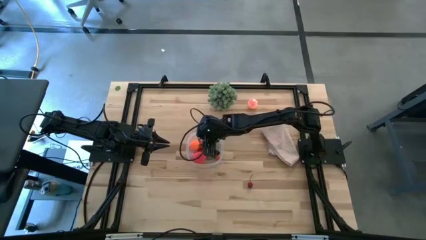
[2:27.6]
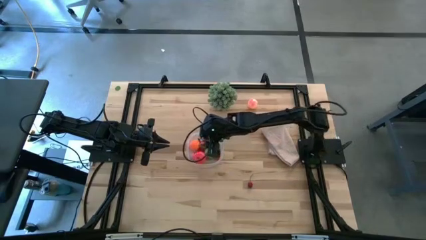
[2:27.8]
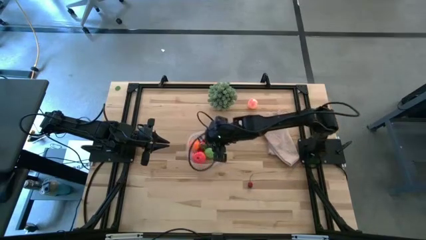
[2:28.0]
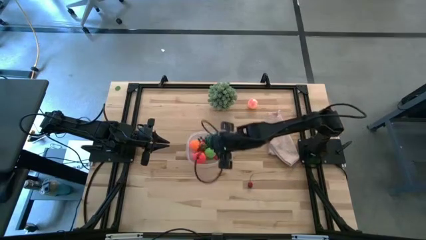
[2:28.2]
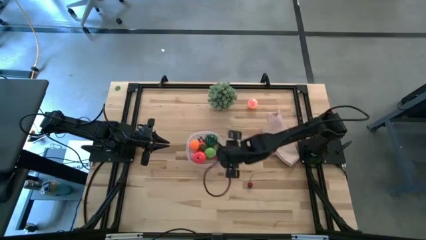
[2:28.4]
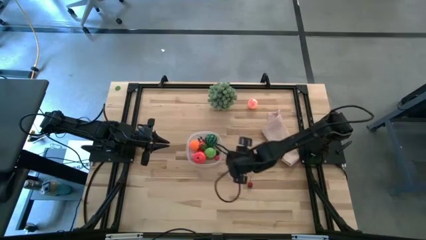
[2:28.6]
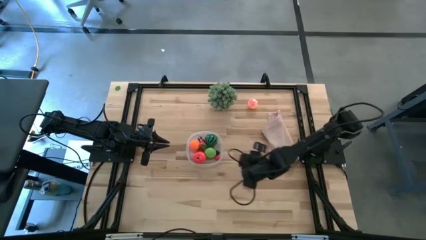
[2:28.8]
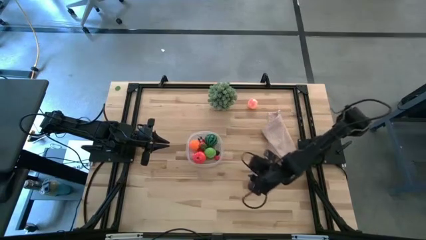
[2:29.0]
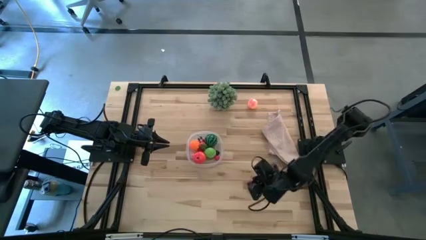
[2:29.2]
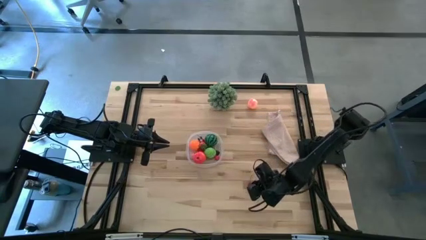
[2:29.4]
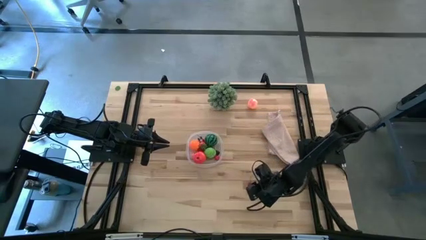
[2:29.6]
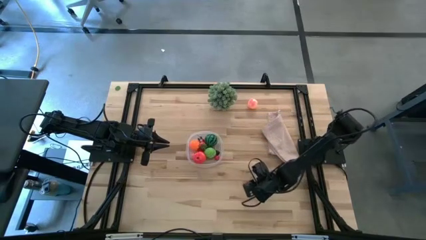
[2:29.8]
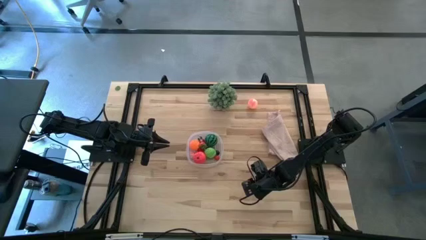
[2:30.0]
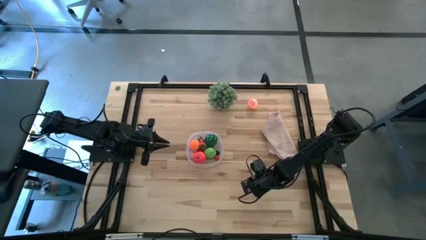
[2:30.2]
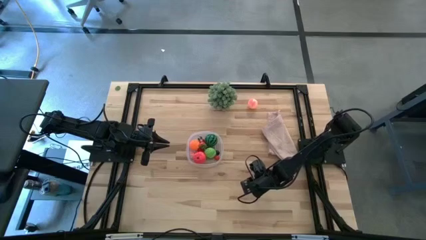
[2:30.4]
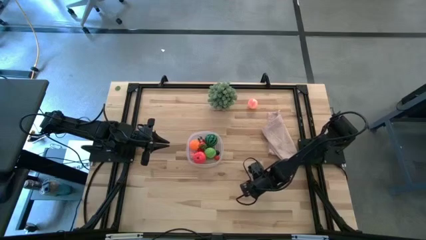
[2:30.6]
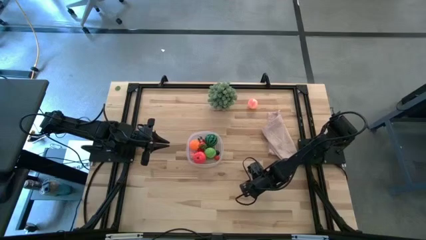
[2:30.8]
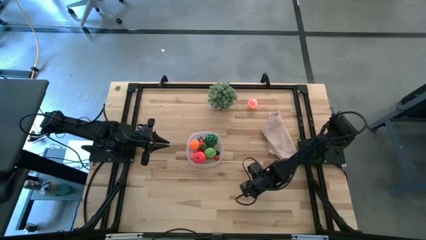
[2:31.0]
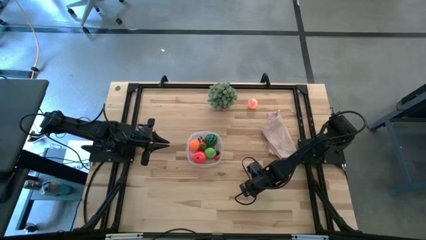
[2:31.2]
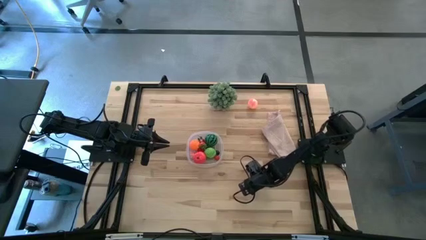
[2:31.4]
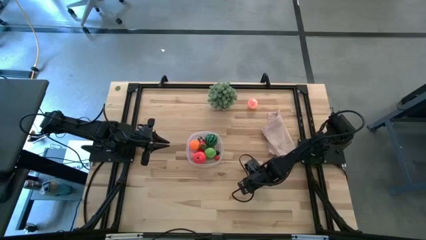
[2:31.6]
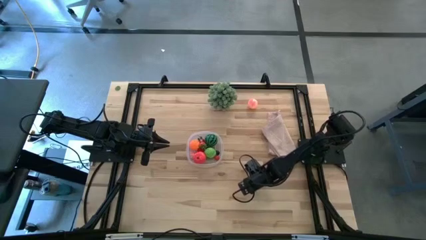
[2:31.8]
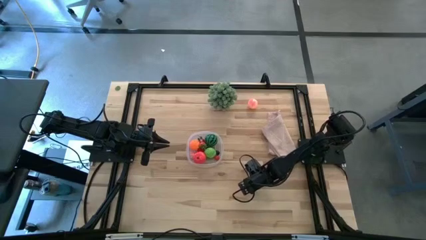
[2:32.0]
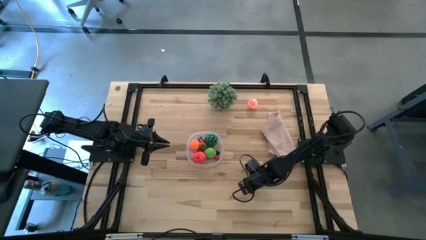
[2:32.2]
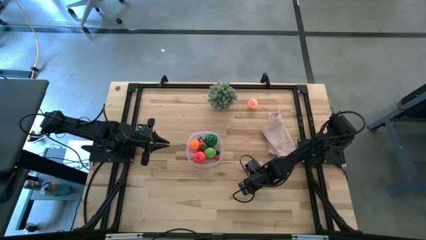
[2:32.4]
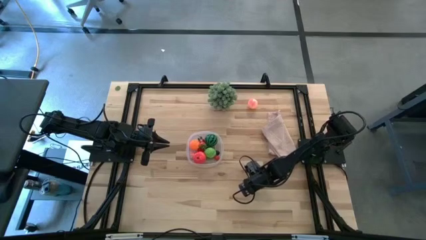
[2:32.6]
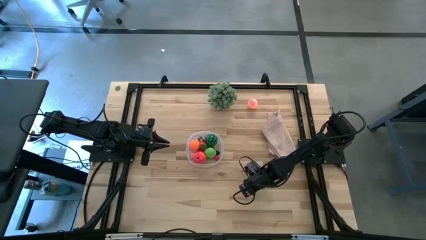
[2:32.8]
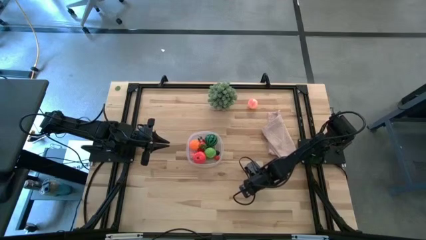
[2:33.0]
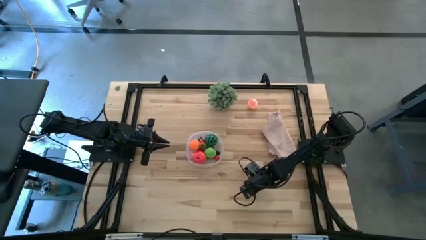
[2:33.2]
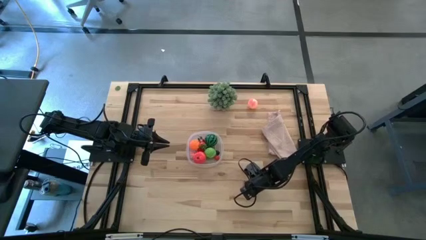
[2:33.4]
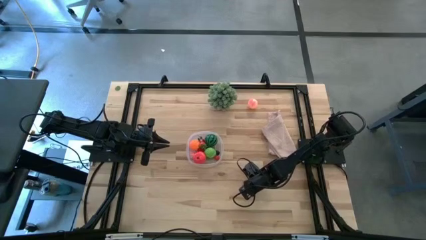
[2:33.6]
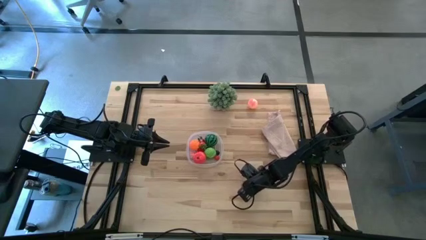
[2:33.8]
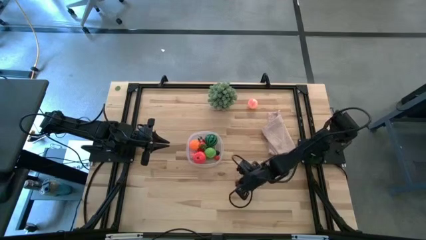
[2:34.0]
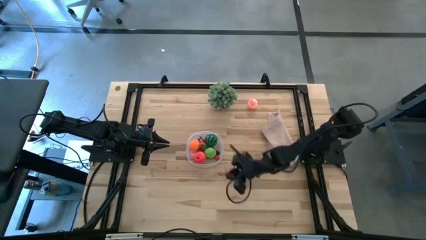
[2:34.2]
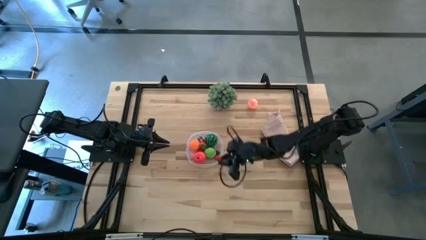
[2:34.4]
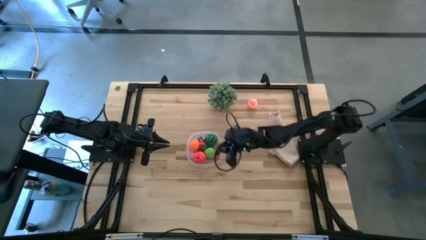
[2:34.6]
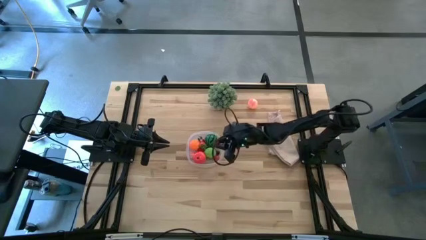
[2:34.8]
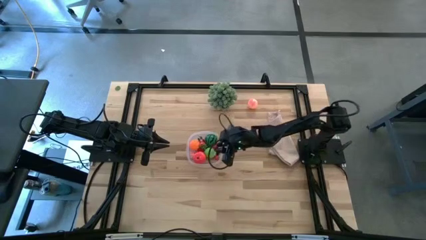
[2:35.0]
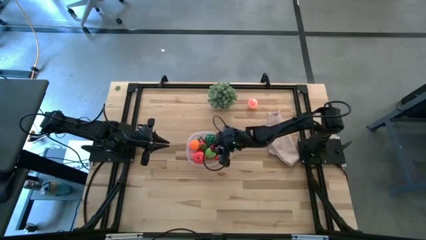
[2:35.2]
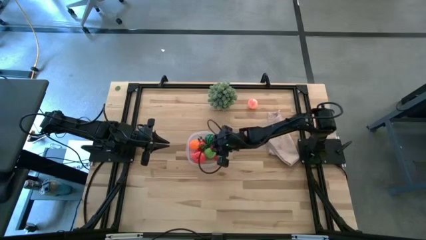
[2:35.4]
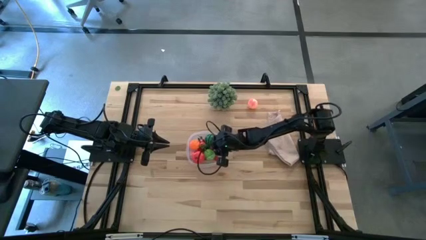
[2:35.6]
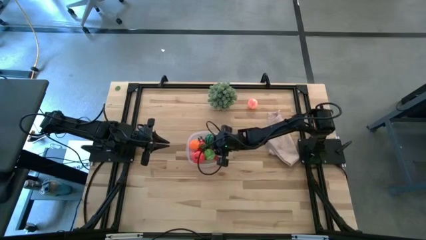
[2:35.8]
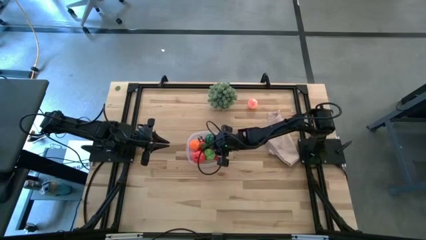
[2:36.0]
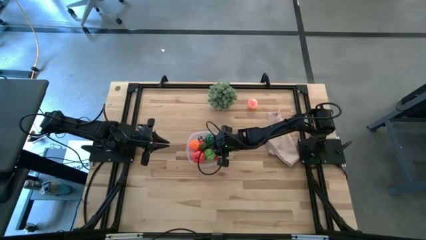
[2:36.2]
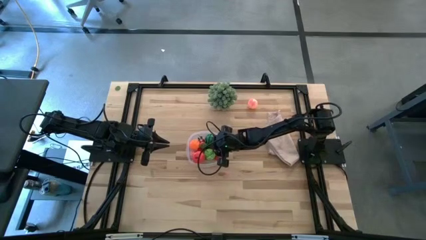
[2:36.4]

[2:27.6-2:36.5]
Task: Pick and placing Produce into tupperware
Put the red cherry into the transparent bin

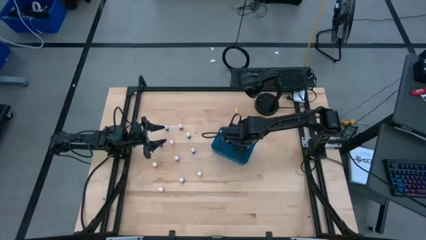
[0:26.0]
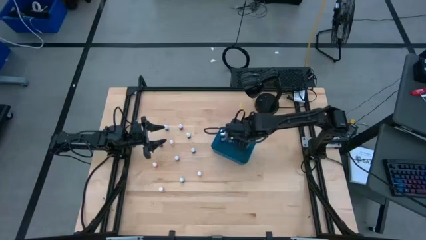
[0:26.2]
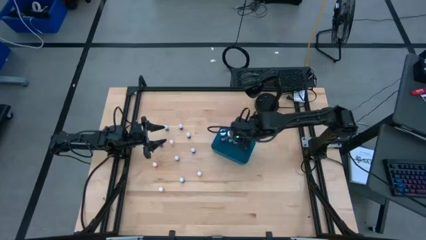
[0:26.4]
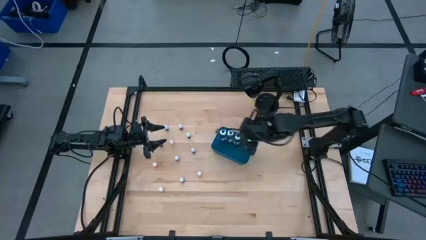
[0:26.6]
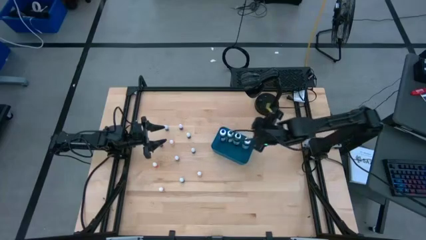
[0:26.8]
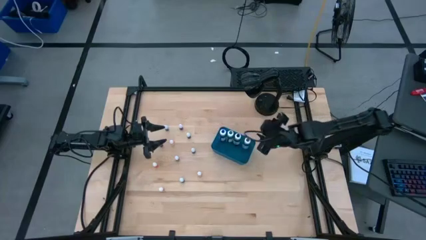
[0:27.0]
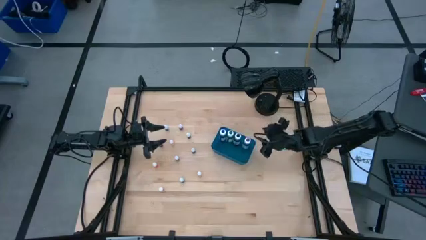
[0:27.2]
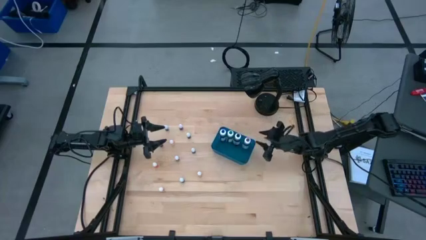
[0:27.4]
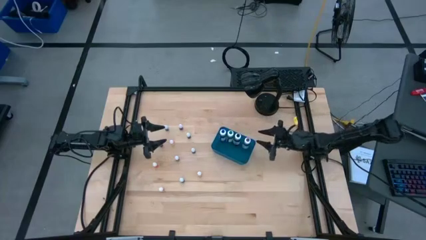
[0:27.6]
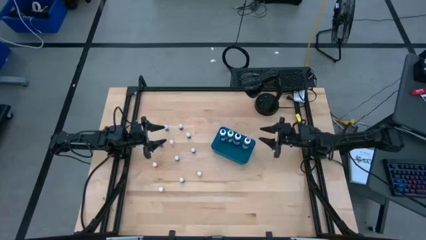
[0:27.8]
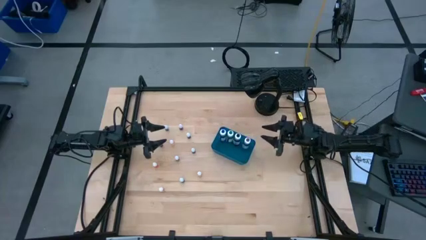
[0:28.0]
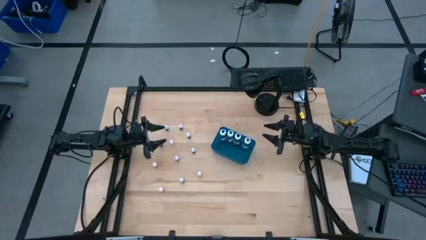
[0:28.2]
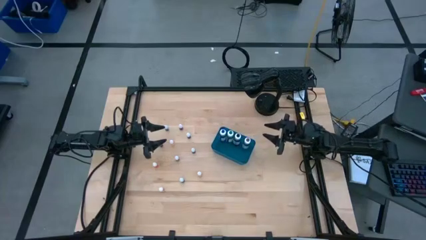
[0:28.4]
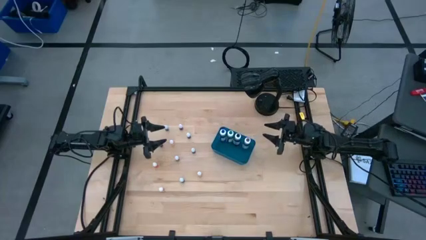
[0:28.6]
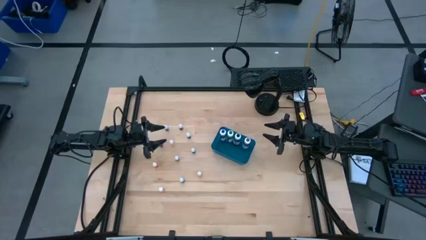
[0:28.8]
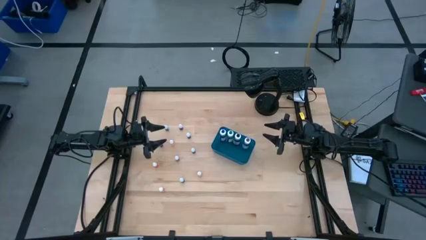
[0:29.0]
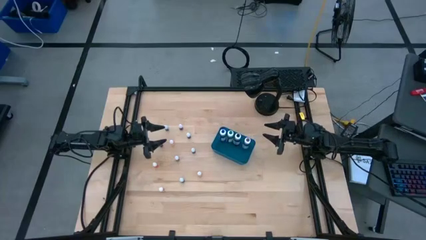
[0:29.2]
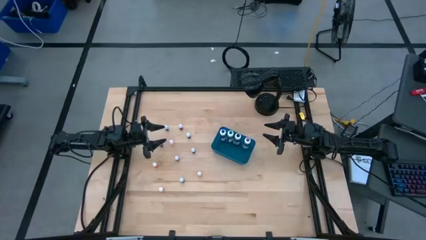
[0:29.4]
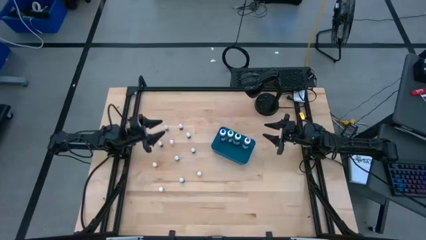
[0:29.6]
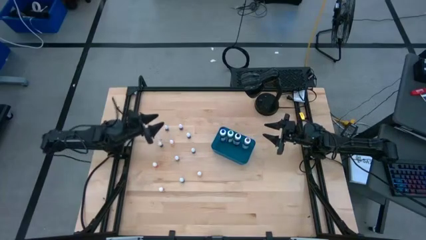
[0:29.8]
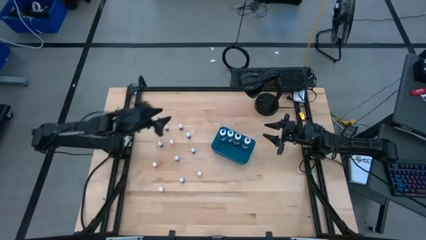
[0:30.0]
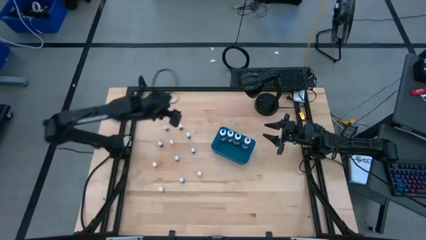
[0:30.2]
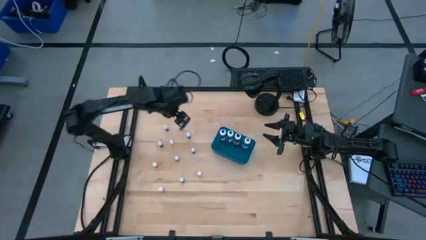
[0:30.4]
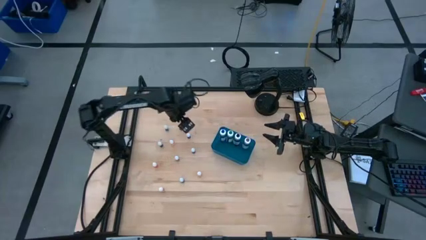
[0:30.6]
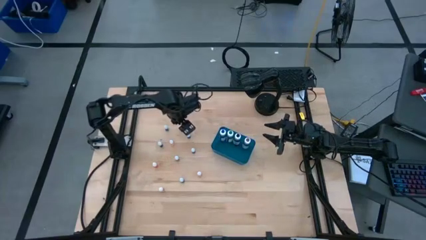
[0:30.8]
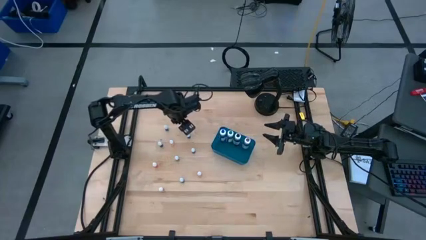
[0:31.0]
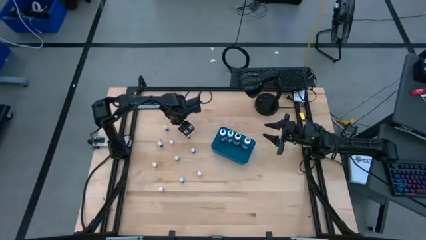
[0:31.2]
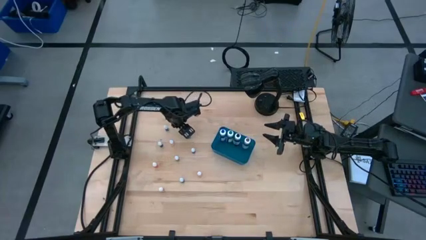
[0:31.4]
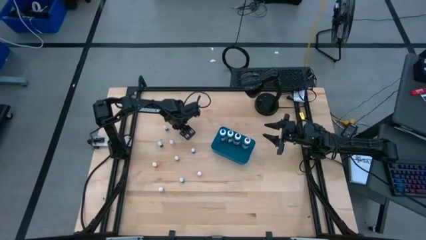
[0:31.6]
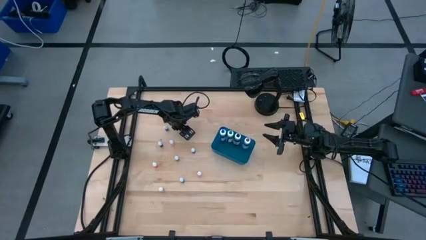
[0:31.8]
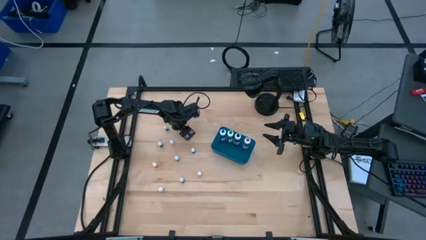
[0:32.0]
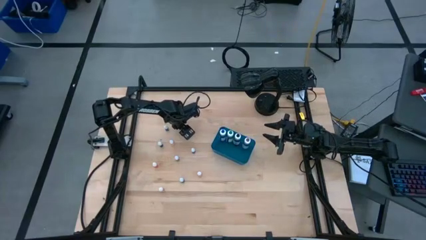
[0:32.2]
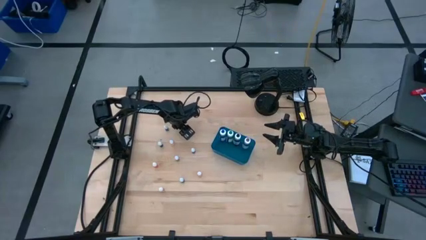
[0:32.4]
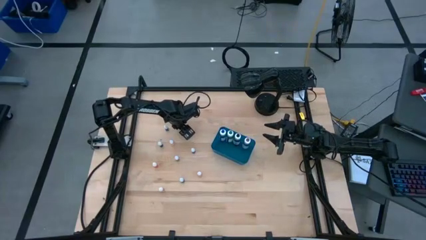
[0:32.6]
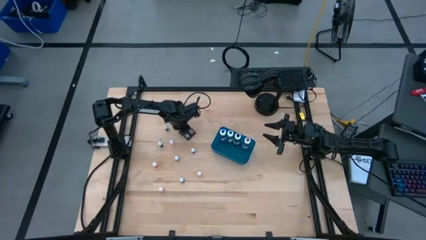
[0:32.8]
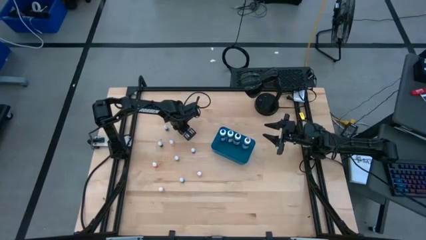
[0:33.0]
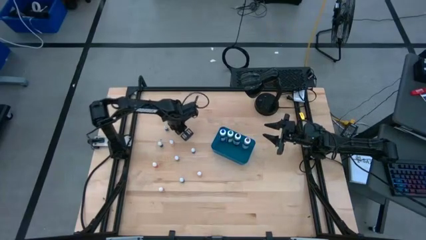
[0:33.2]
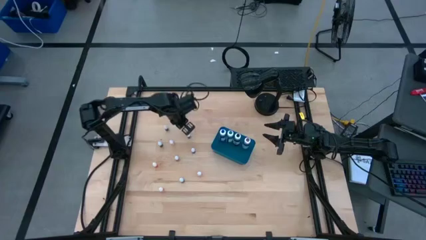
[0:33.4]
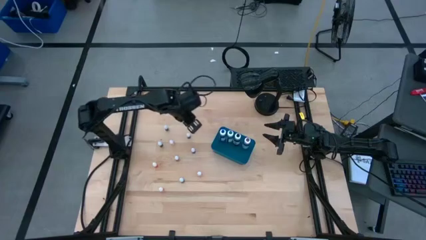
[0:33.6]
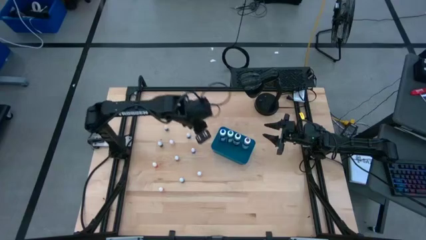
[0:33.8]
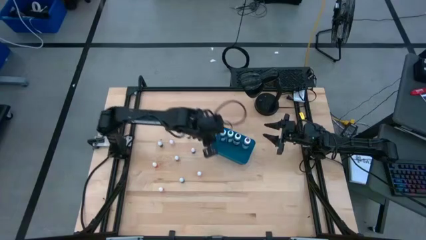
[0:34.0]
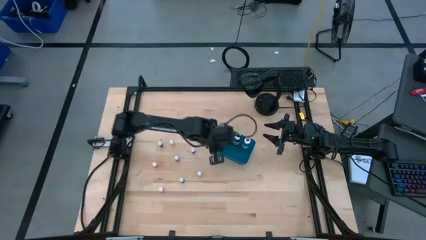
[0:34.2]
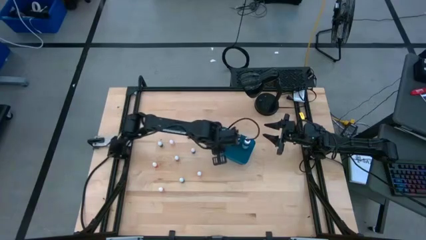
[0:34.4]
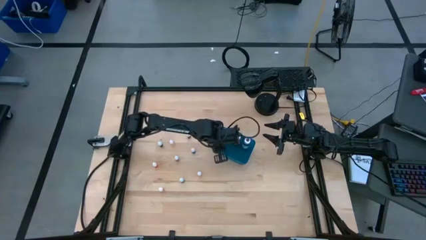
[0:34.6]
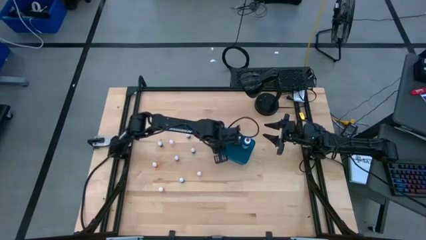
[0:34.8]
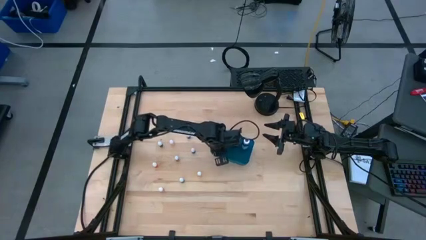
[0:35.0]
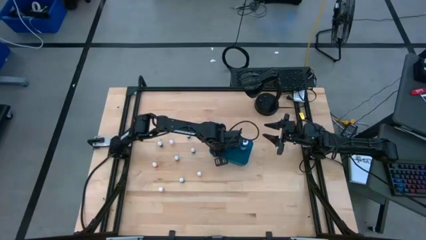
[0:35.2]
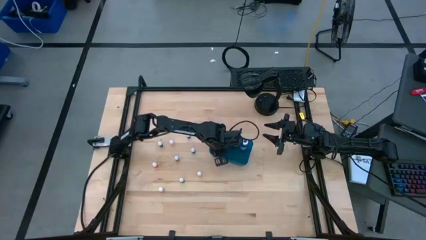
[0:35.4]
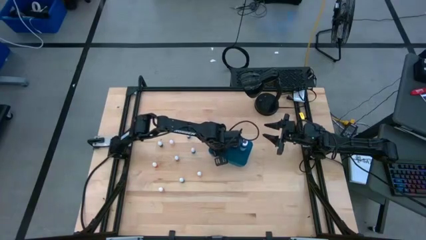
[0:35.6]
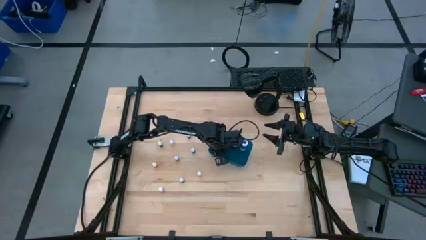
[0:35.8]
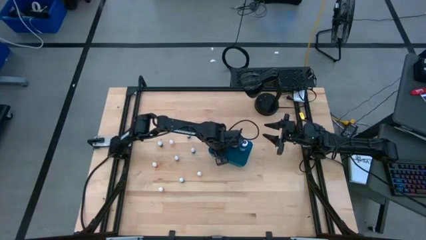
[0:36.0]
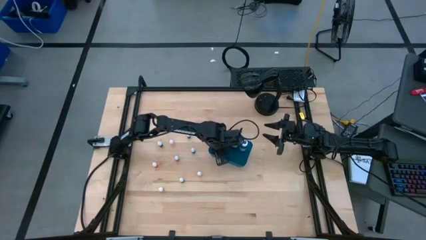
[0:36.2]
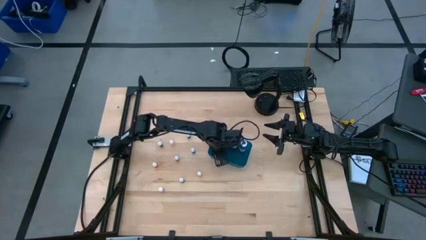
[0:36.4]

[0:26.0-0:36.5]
Task: Pick & Place food coloring
Put the small red food coloring bottle into the blue container
